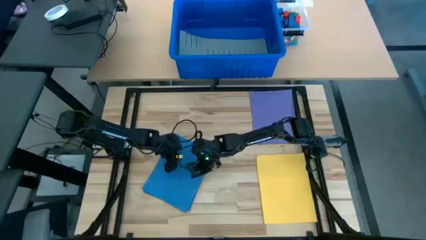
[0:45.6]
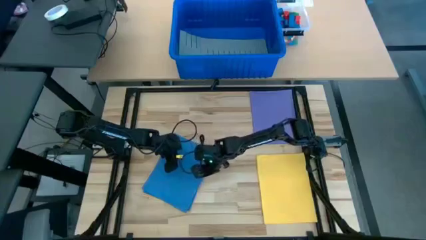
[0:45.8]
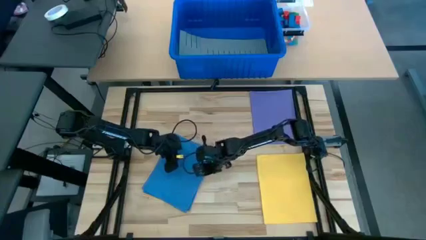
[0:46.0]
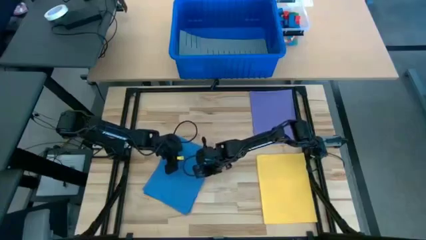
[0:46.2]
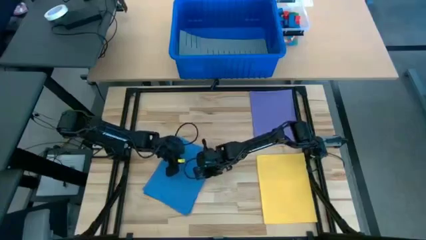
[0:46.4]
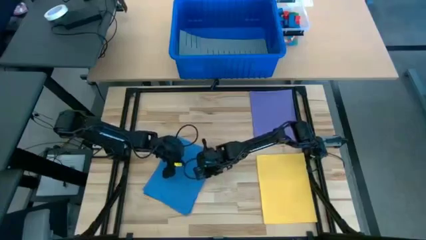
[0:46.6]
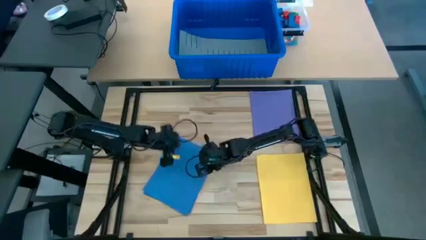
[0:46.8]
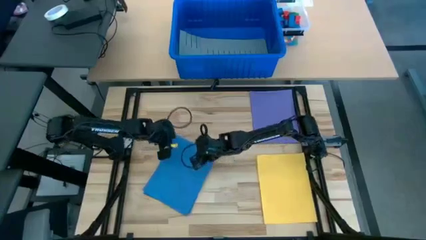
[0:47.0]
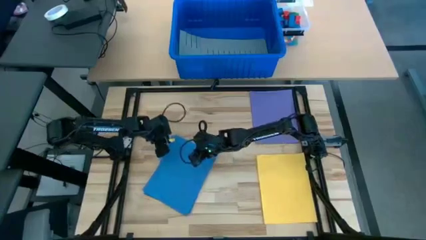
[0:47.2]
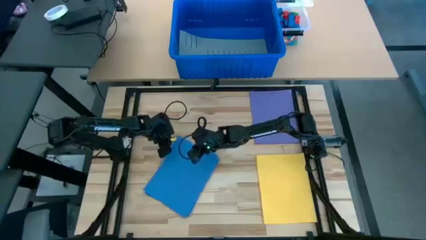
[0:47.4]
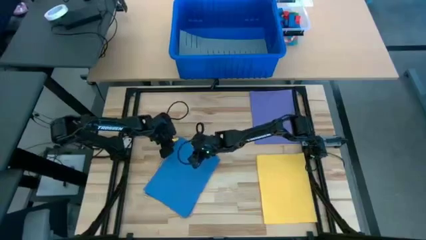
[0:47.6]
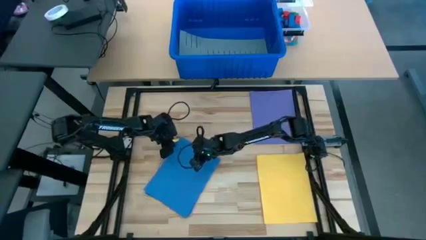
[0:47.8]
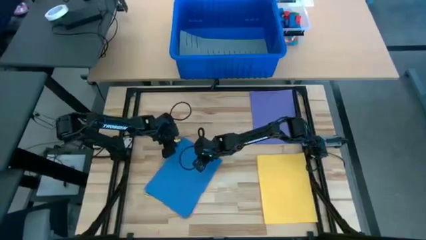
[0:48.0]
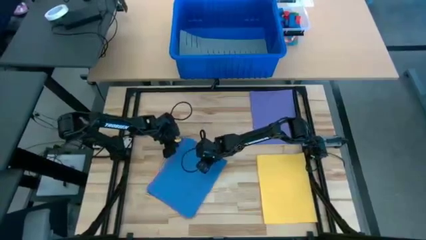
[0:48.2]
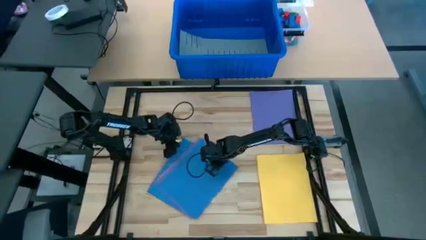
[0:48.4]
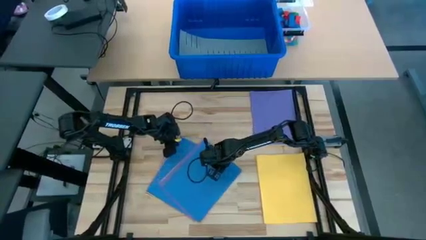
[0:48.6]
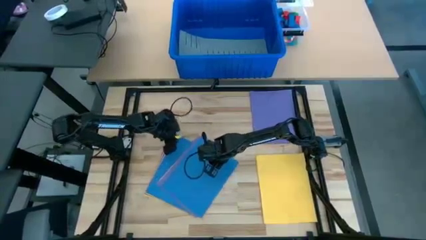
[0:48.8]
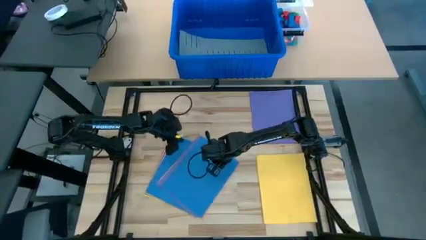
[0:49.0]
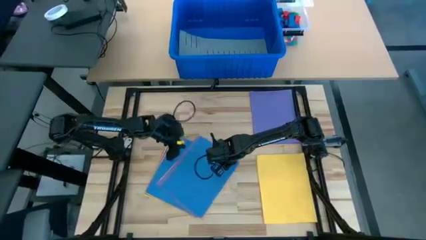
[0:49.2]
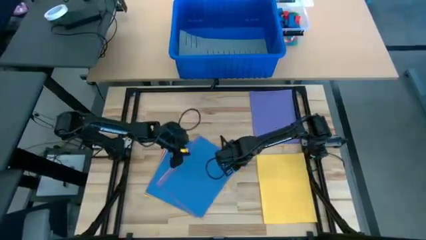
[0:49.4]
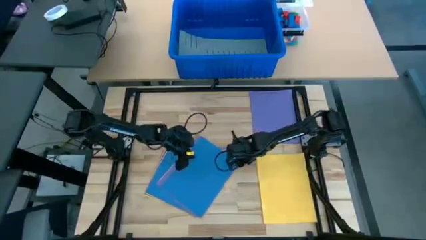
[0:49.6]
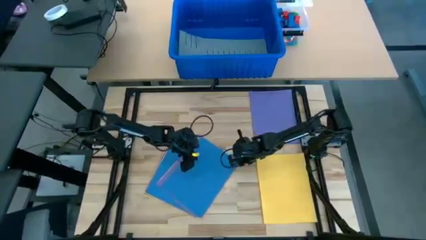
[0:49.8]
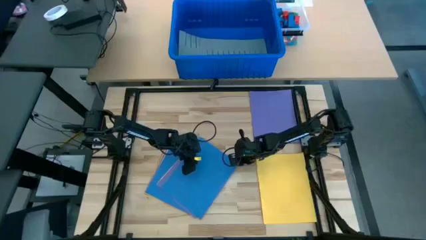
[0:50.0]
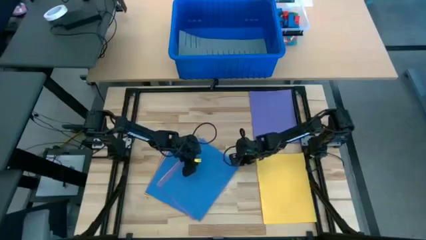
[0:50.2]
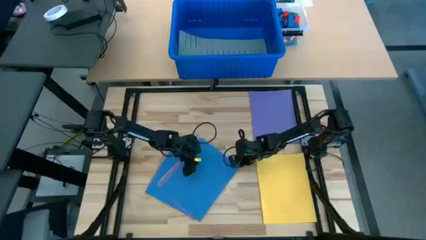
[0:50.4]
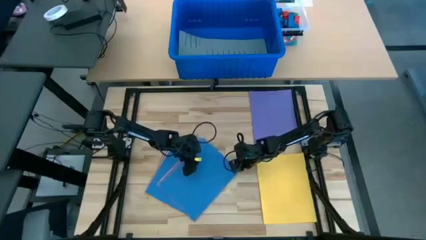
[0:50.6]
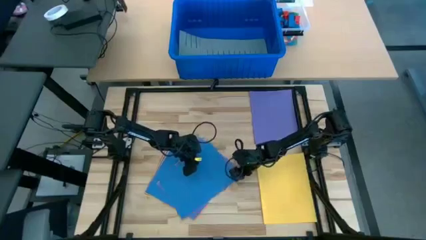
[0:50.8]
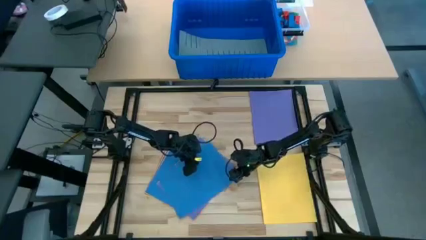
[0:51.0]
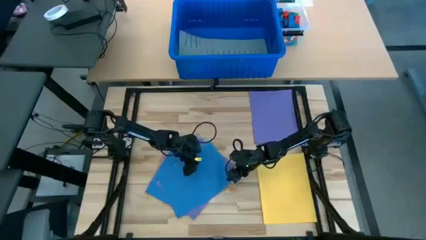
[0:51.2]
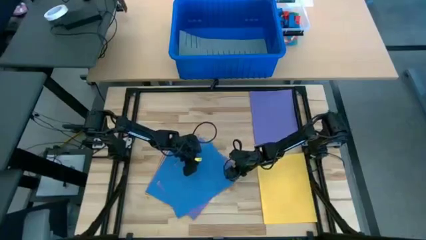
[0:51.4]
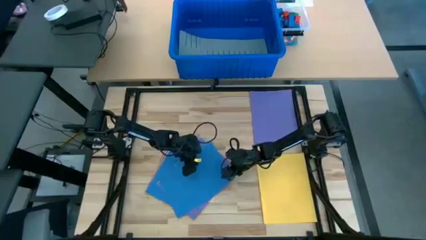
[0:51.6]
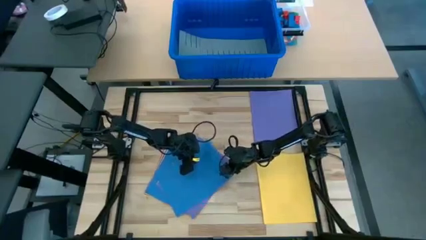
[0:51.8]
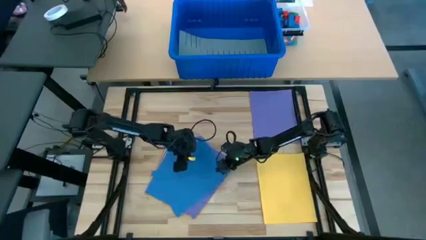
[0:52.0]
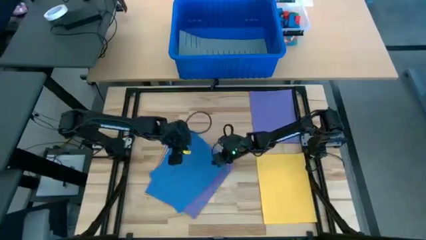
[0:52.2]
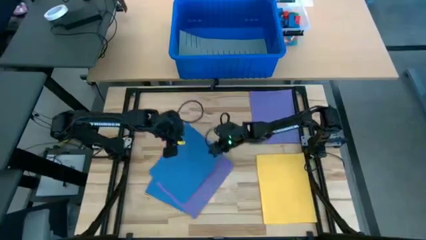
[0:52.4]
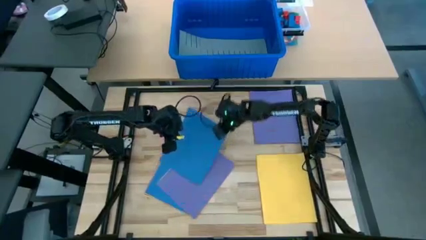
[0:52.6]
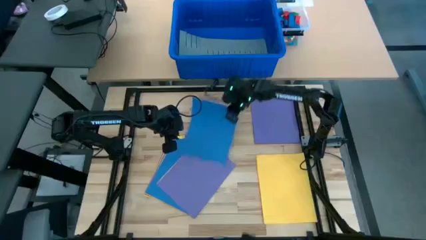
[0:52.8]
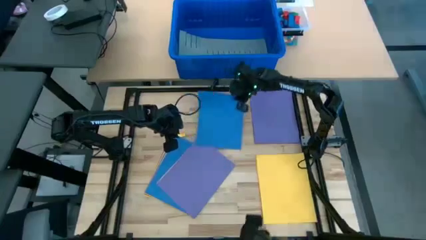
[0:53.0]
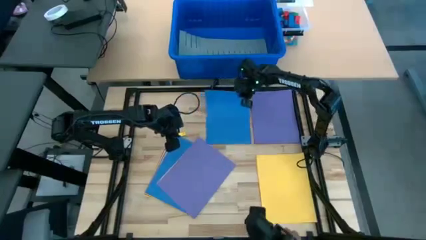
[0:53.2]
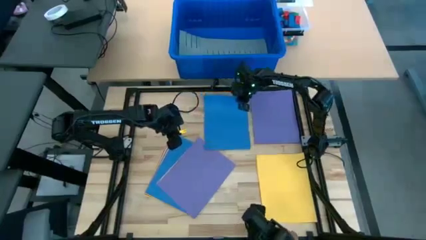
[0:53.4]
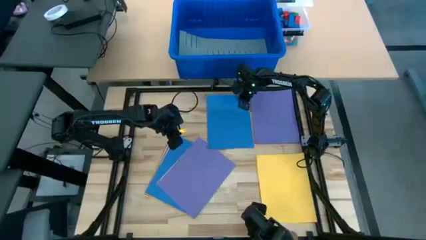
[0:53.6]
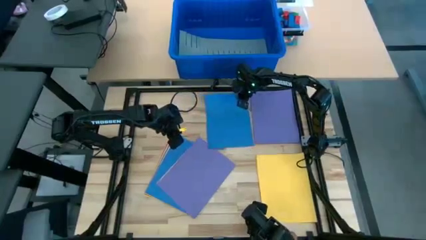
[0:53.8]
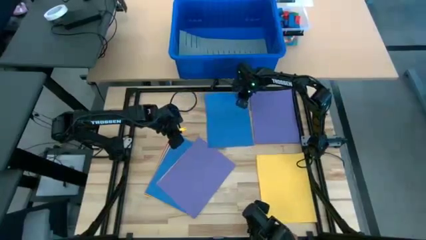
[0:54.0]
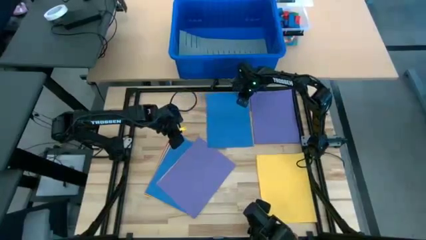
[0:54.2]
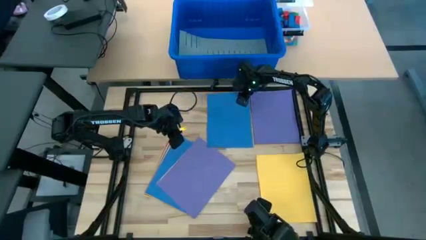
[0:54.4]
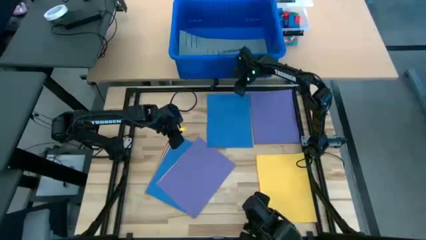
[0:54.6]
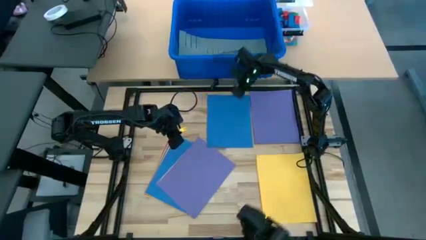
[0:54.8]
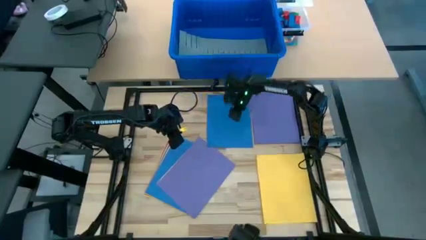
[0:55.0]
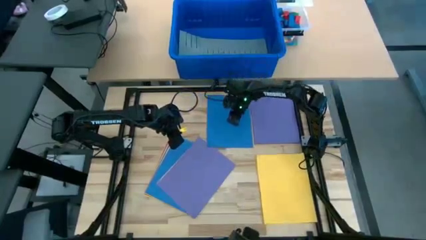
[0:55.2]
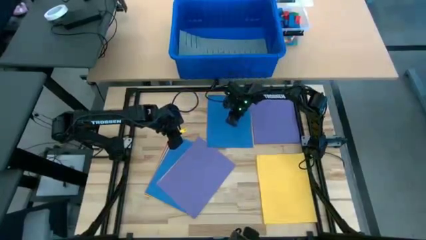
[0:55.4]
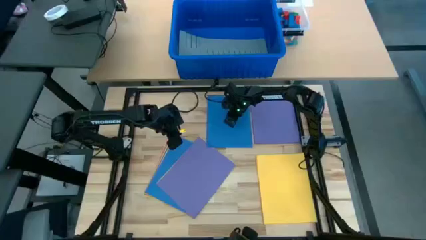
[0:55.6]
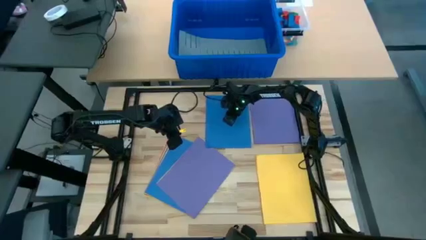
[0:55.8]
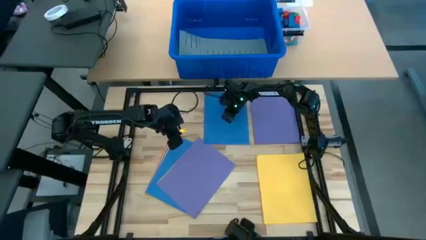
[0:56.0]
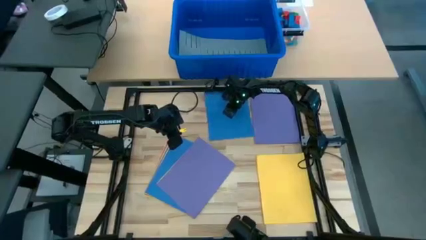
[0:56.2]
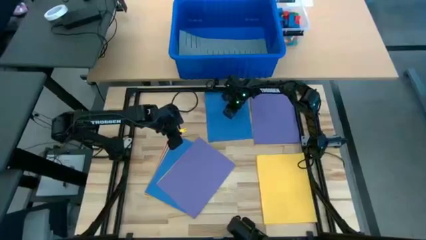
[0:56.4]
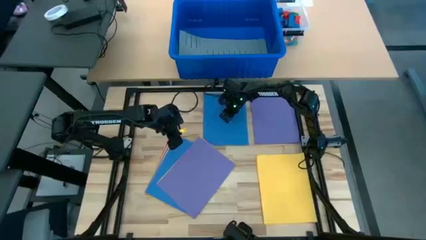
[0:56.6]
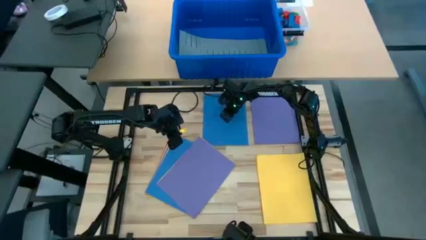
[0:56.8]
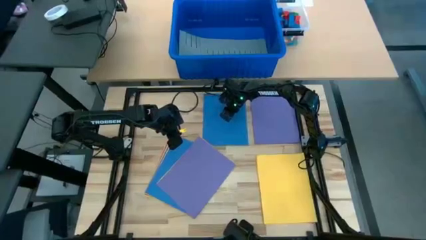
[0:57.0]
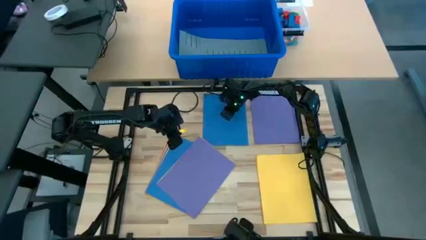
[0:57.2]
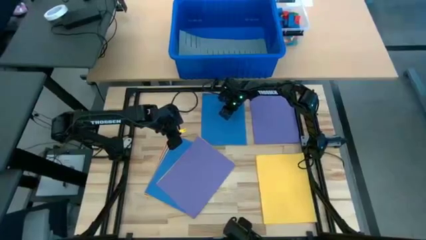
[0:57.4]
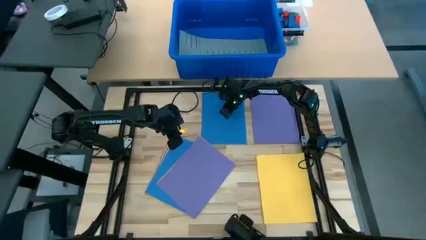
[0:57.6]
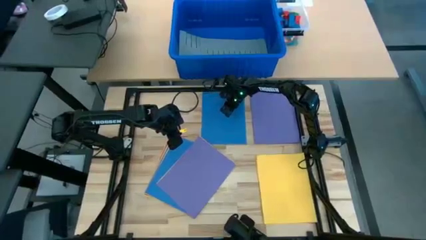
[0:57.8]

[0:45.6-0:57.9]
Task: Organize paper
Put the blue paper on the table

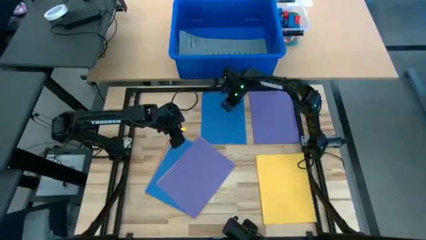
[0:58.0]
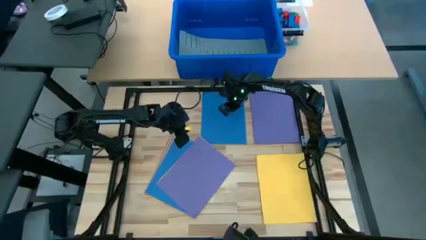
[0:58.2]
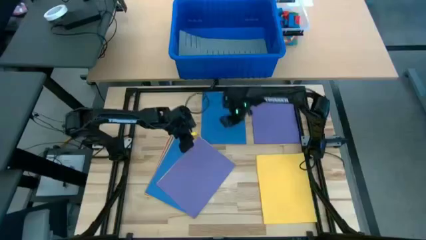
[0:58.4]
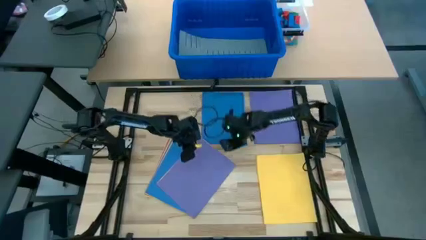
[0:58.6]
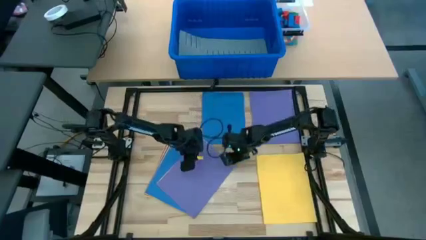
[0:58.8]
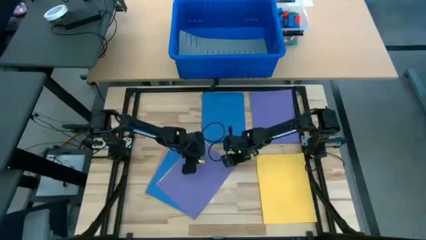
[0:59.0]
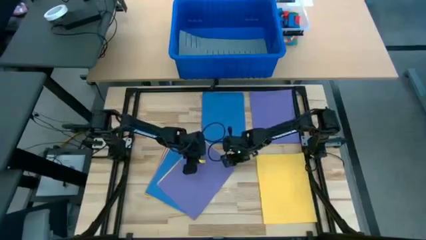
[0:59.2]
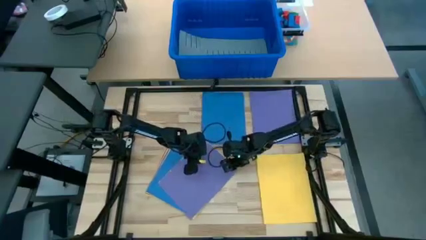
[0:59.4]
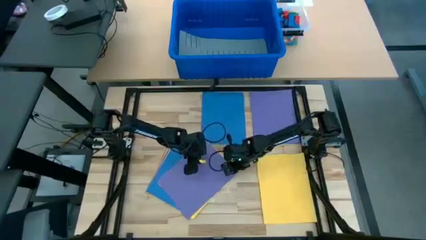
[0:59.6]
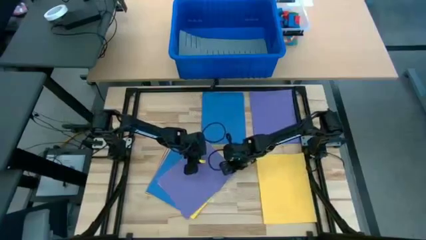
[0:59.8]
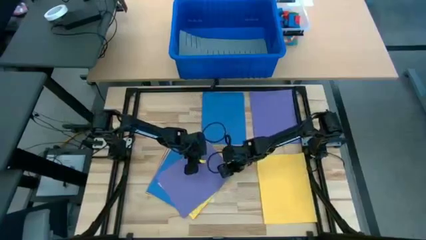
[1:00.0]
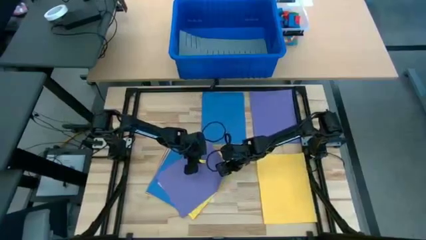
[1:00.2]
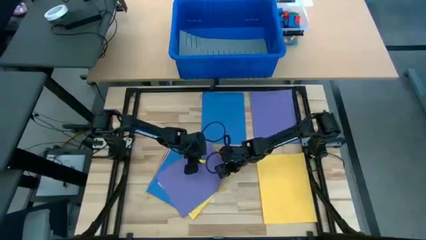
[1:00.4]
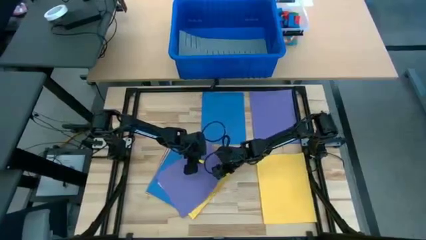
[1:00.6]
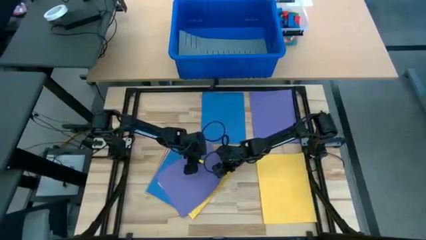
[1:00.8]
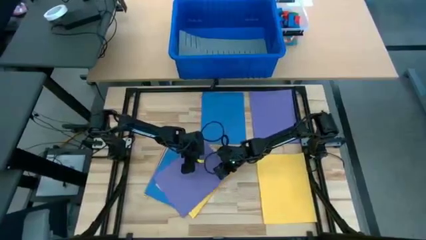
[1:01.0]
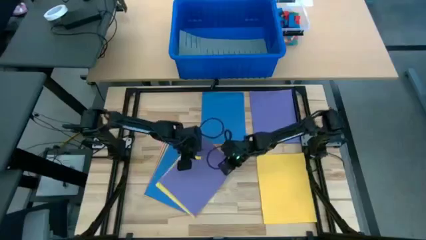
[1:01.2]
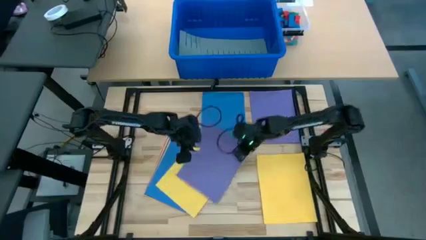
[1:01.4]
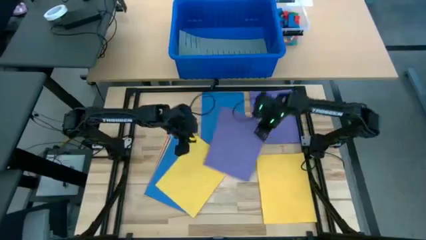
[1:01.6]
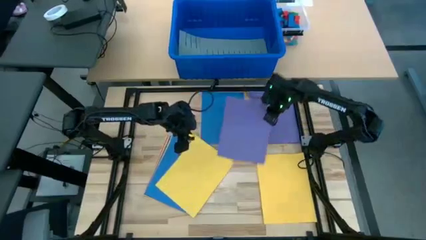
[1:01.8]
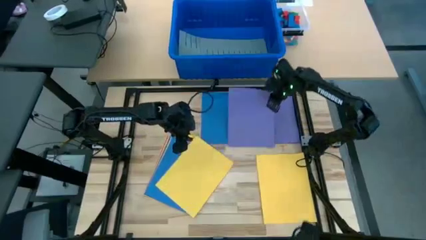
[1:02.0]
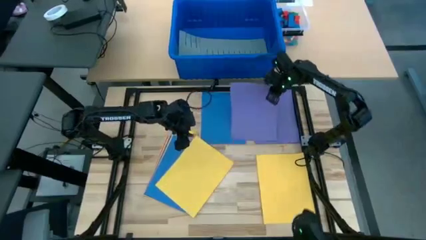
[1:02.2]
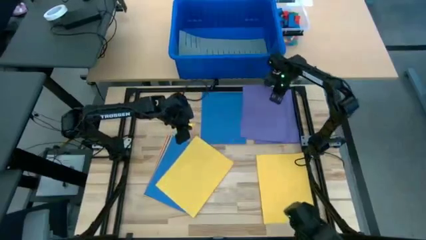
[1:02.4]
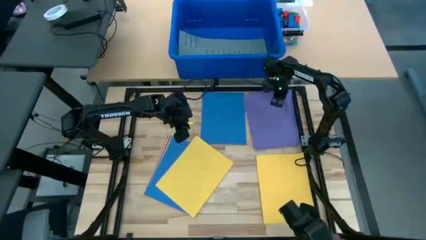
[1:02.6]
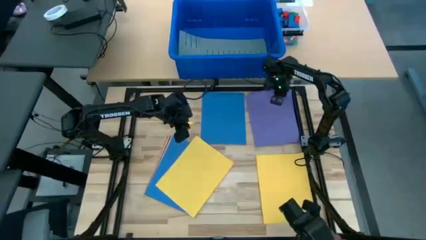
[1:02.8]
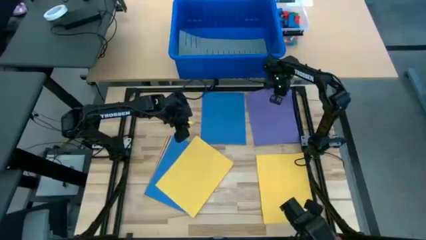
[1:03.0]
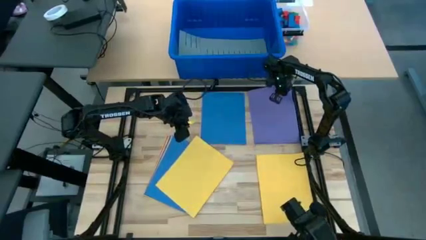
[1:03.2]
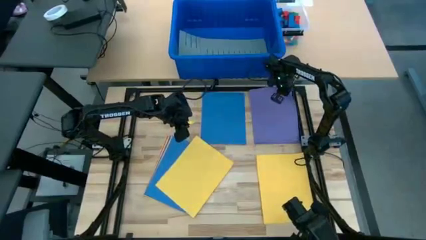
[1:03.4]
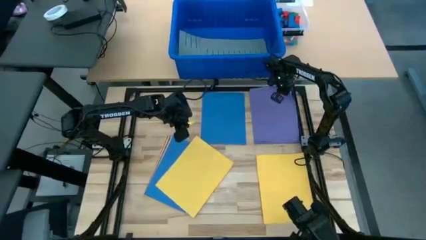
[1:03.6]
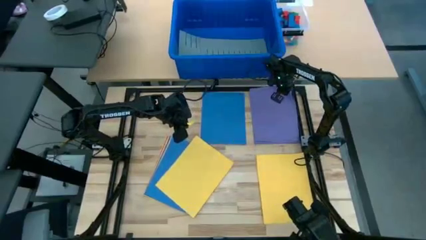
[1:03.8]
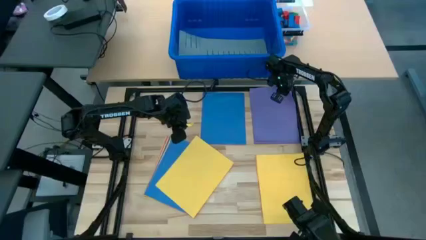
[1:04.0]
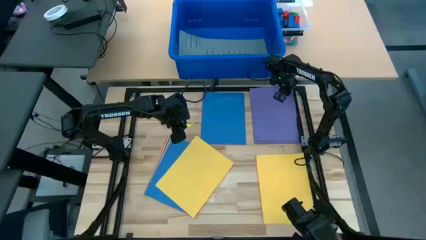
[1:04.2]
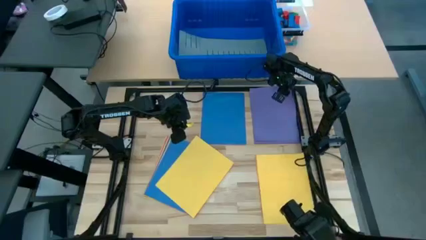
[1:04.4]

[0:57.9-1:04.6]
Stack the purple paper on top of the other purple papers
